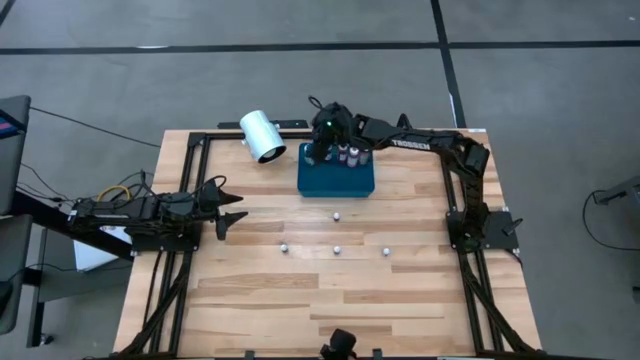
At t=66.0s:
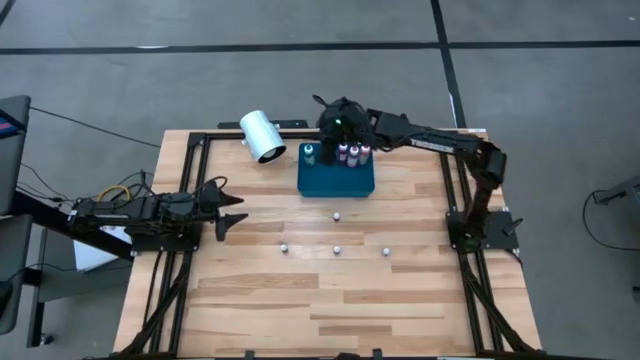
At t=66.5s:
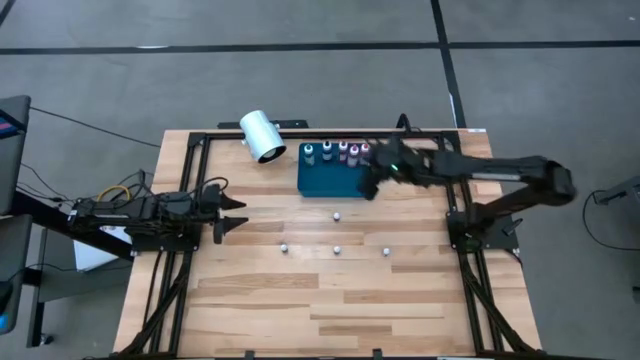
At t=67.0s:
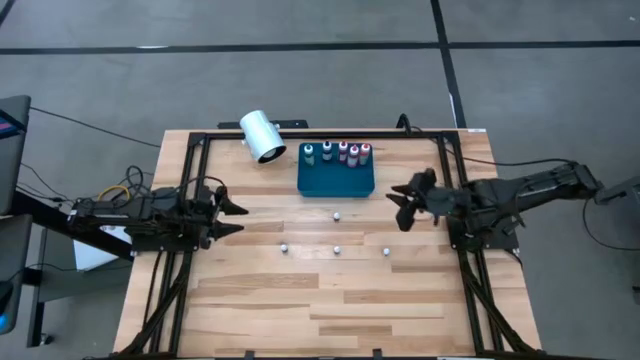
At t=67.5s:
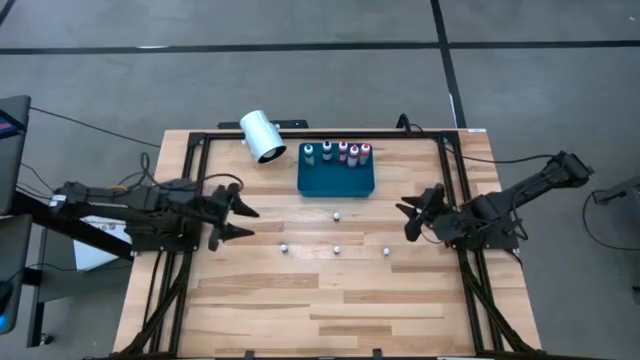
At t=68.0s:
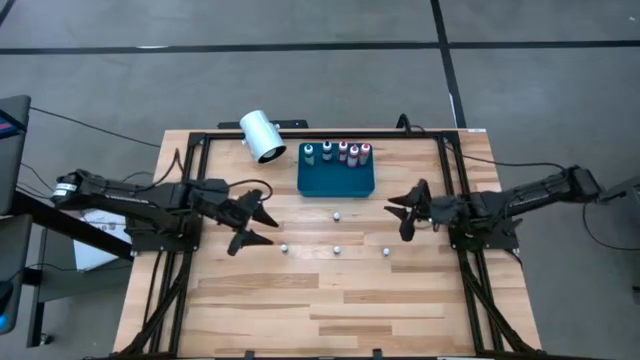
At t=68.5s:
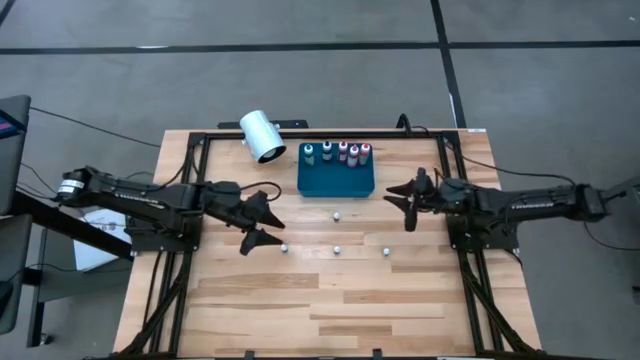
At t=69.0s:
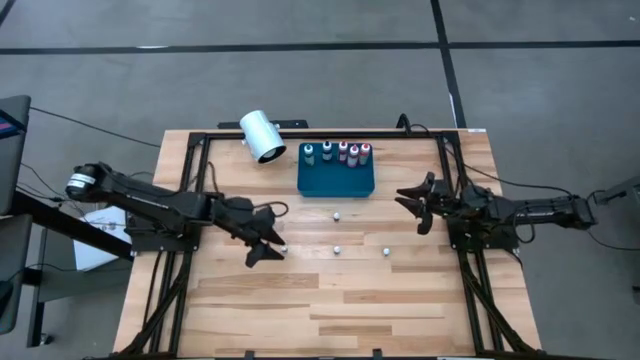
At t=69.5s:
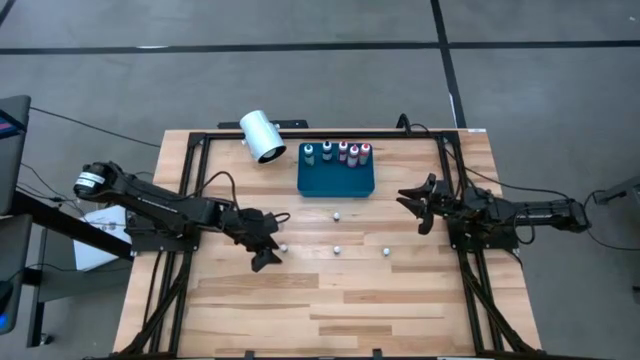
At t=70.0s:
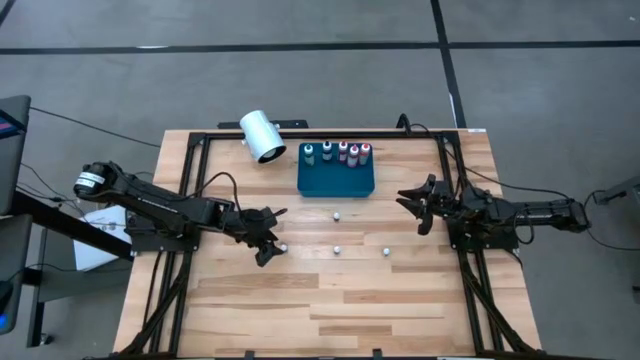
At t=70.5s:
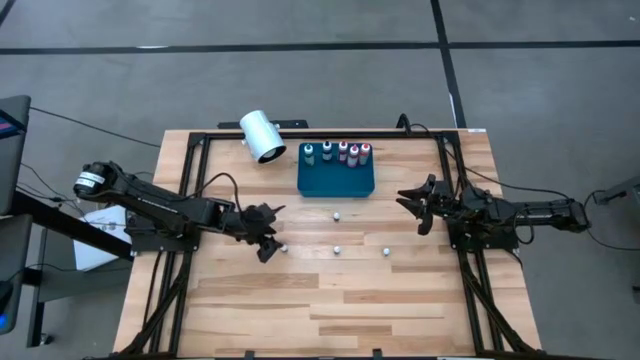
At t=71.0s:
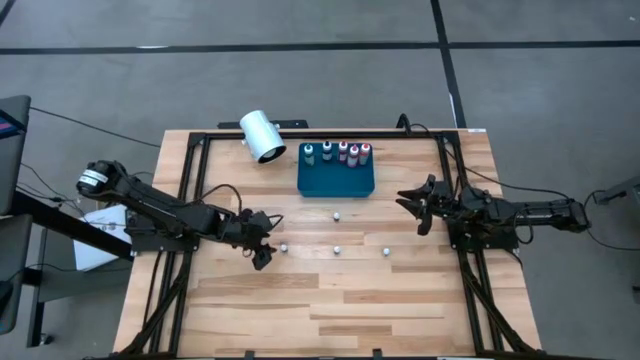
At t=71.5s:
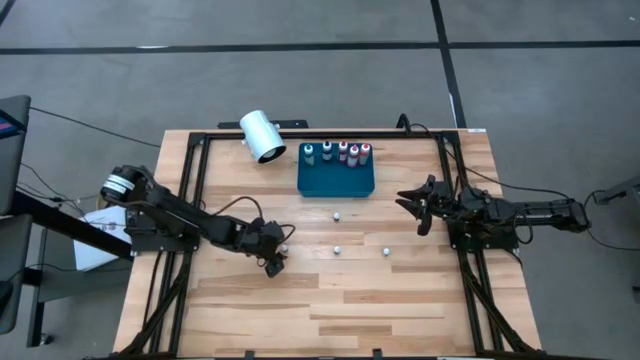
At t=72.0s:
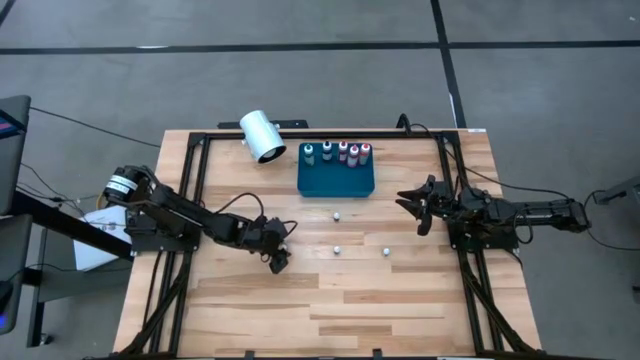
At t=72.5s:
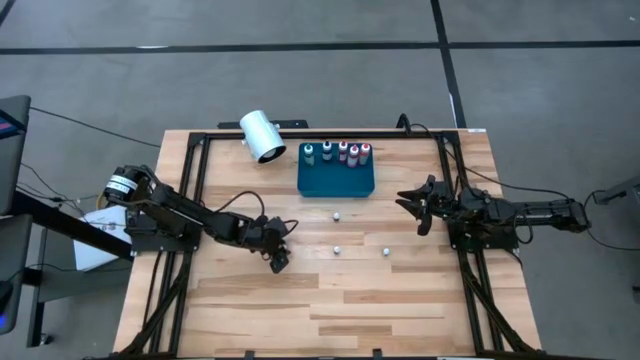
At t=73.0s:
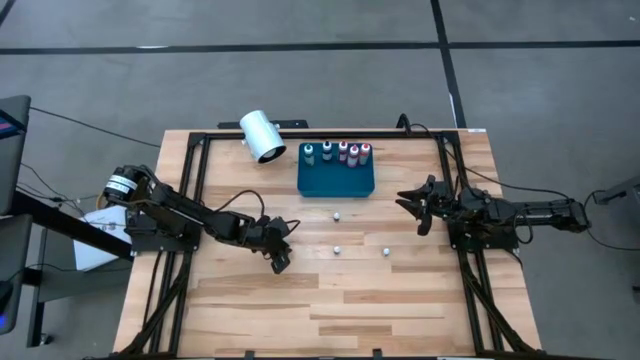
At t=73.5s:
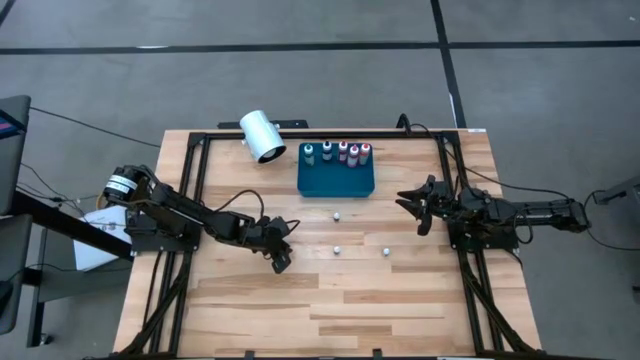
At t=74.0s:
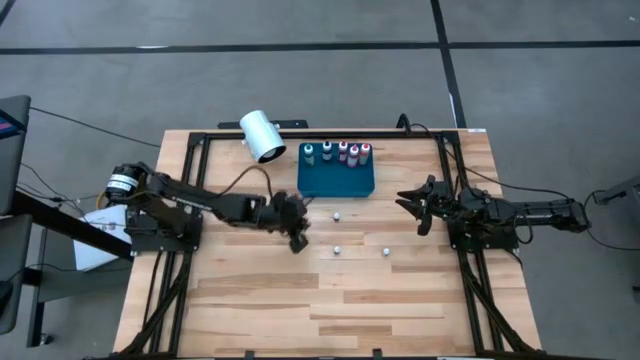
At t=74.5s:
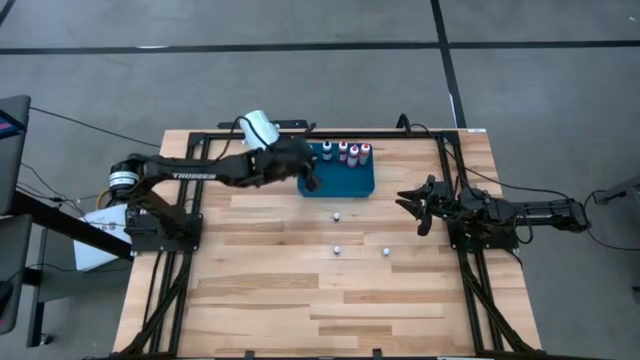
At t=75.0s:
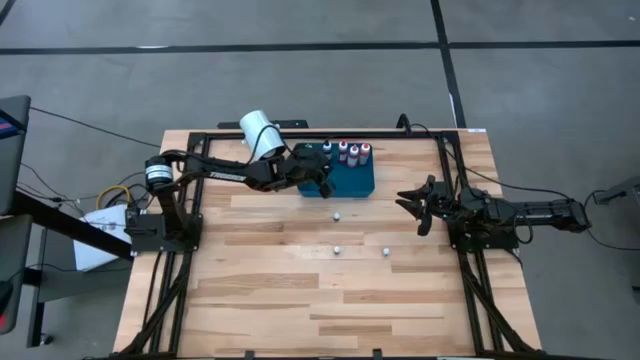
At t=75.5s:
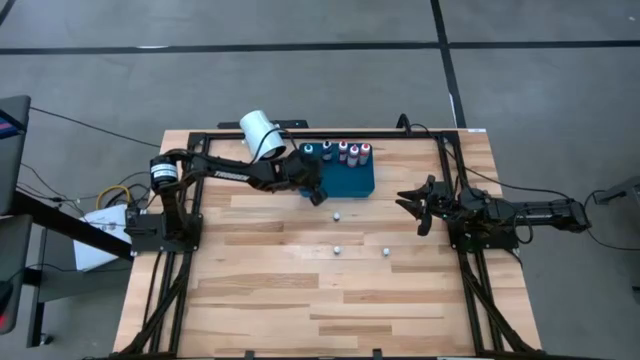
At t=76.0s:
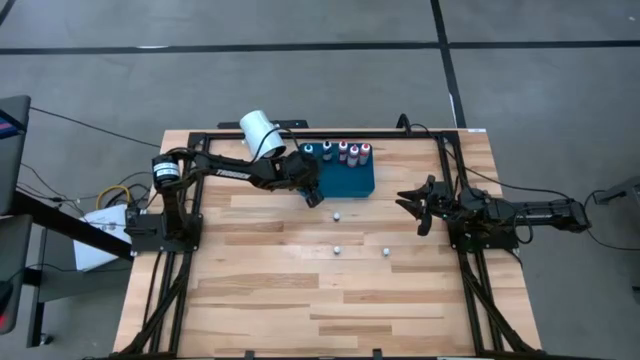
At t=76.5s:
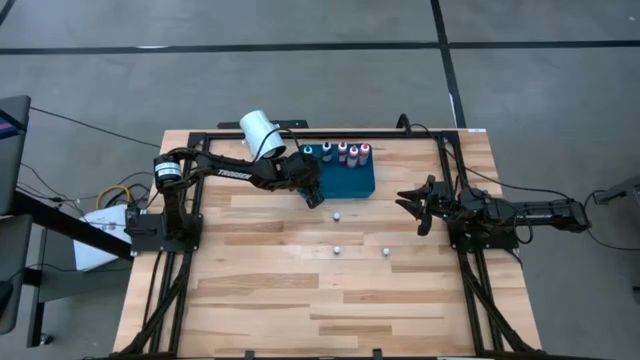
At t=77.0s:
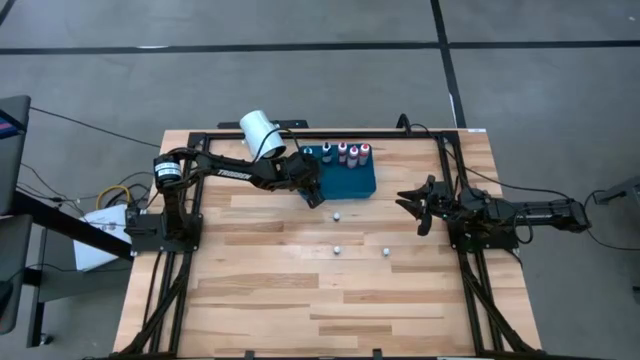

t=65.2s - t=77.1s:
Task: Pick & Place food coloring
Put the small brown food coloring bottle into the blue bin

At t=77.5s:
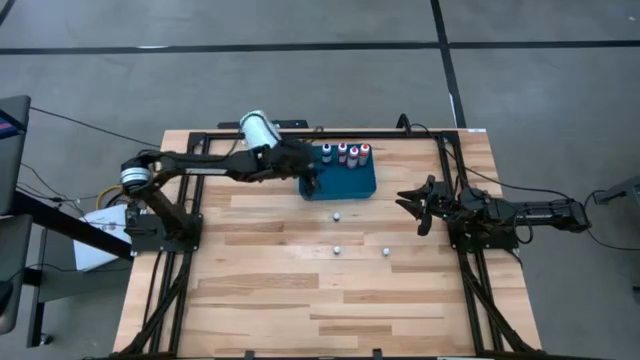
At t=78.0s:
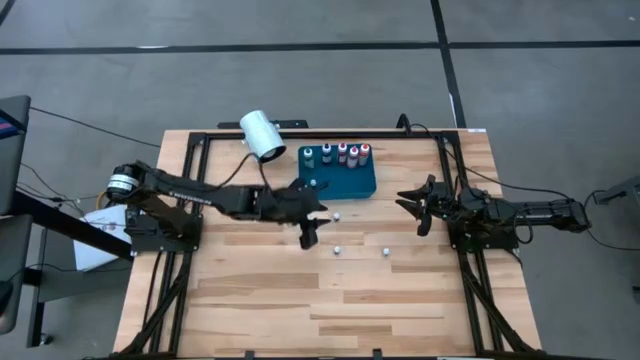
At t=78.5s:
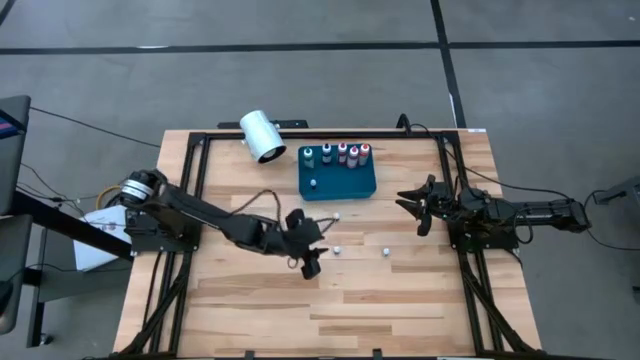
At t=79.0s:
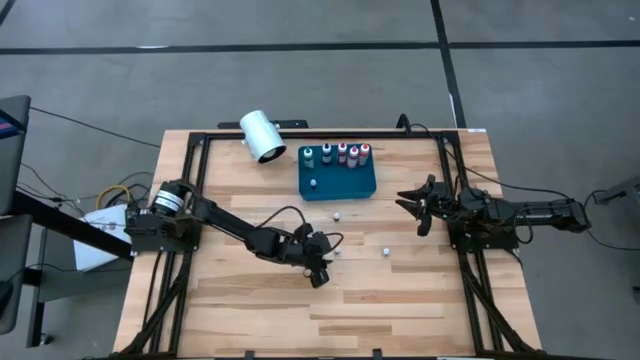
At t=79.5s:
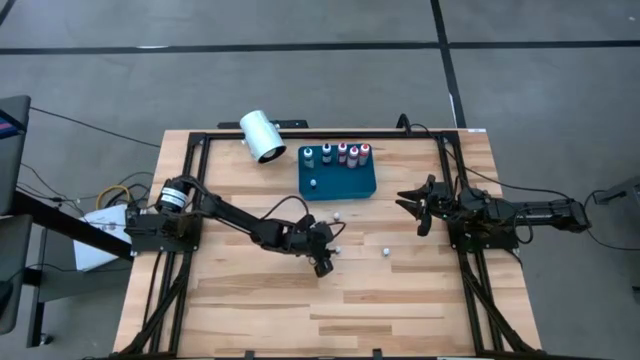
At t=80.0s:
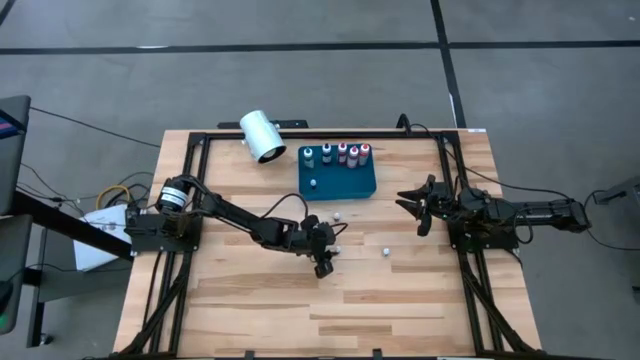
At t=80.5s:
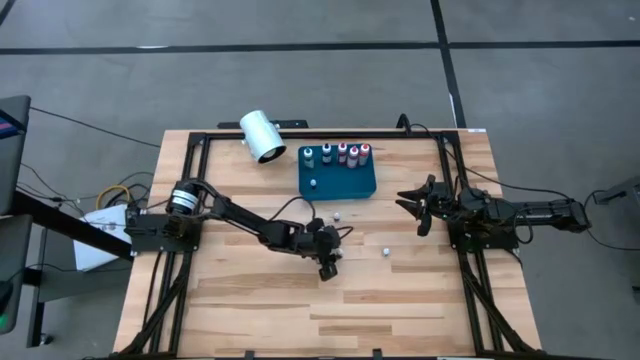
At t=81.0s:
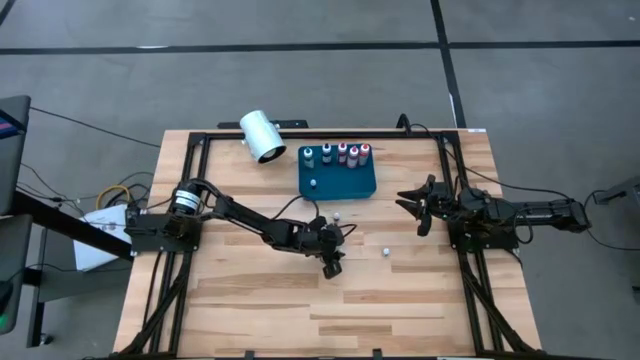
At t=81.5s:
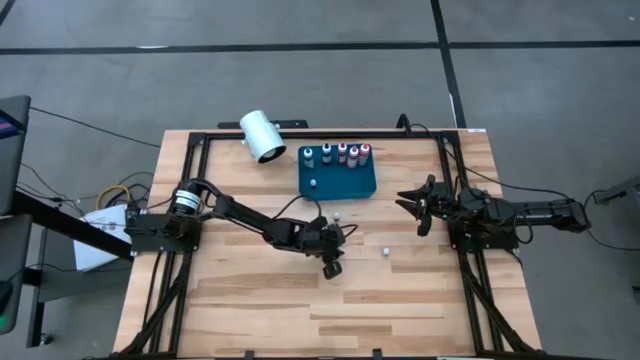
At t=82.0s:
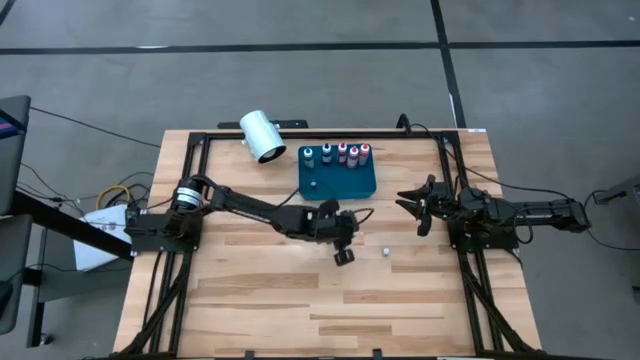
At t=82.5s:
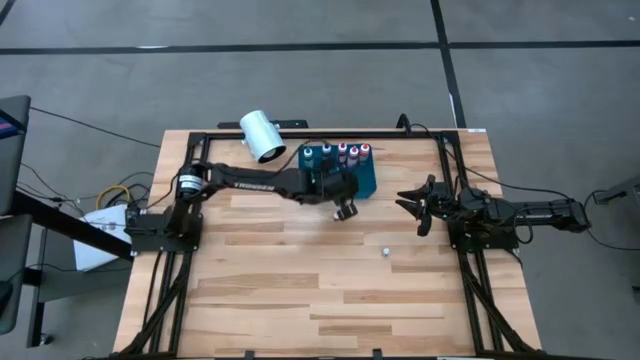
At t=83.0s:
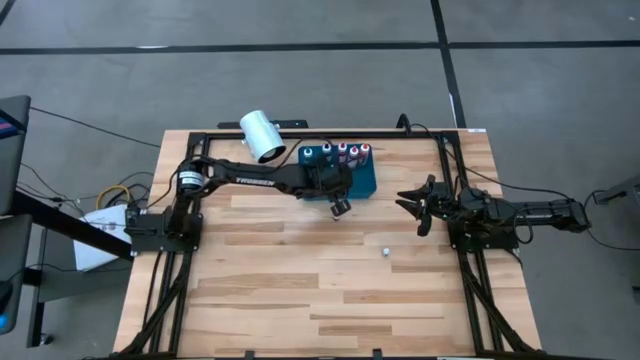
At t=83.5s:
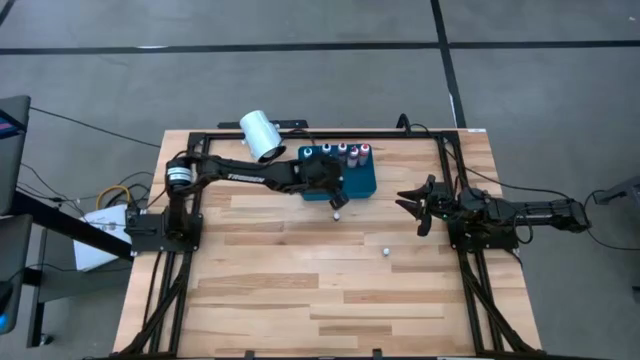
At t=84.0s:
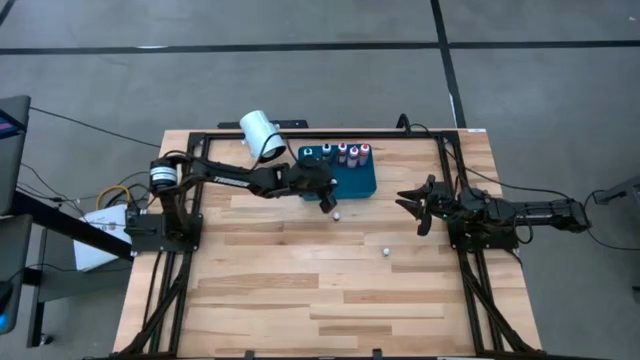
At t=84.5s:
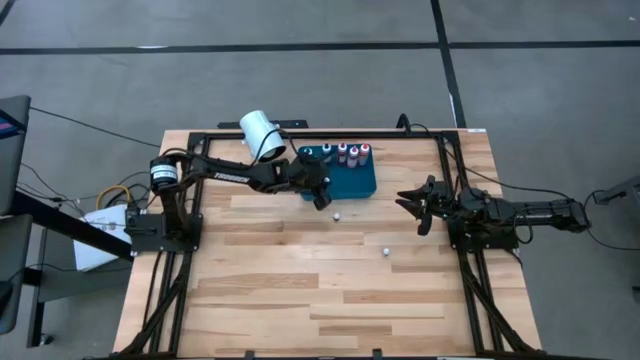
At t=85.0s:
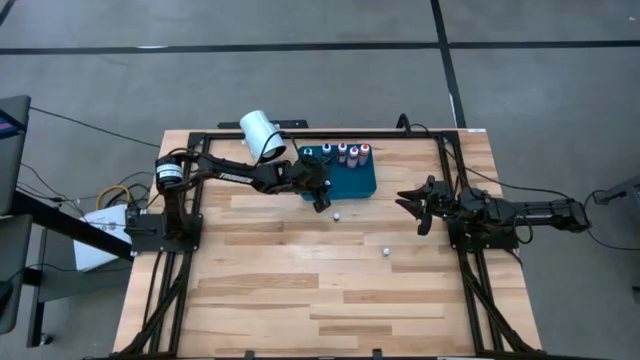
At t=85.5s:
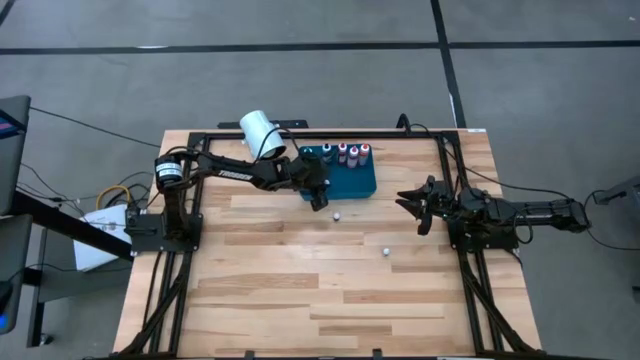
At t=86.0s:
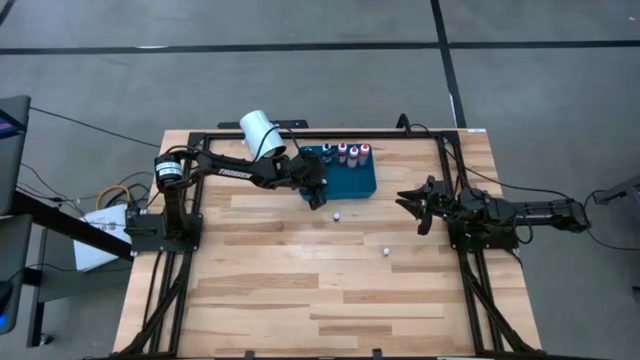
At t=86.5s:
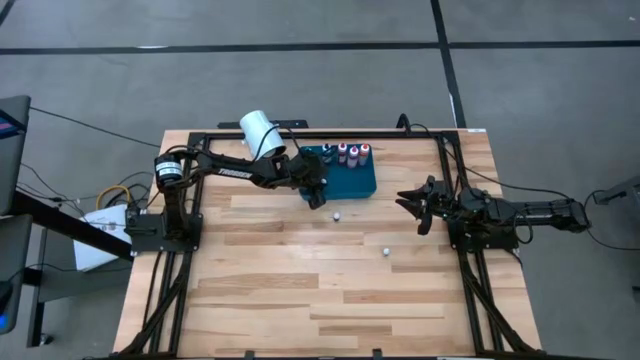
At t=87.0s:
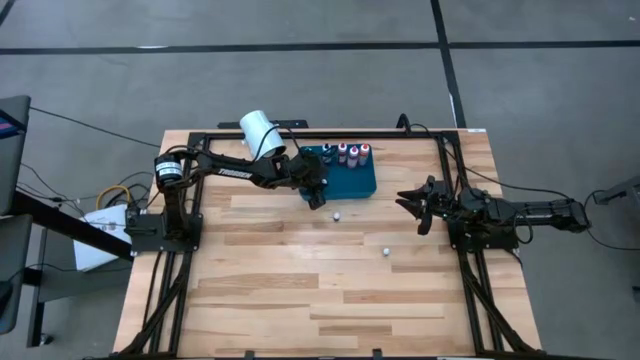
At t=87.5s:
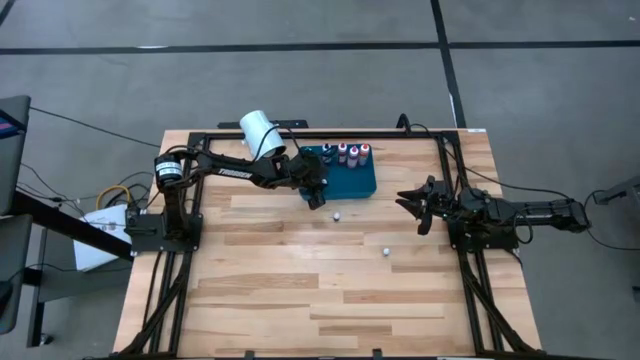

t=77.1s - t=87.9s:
Put the small dark green food coloring bottle into the blue bin
